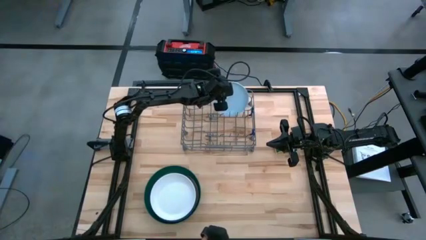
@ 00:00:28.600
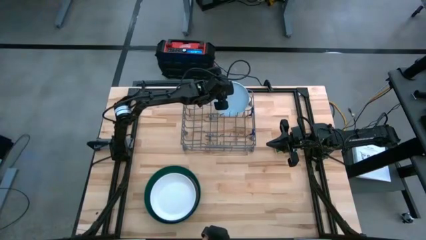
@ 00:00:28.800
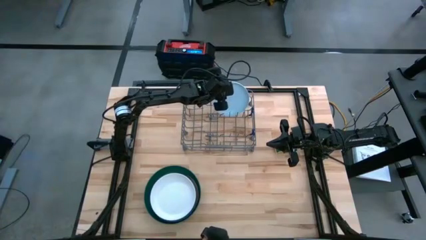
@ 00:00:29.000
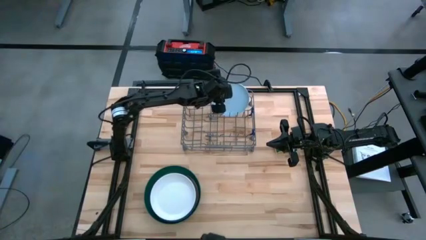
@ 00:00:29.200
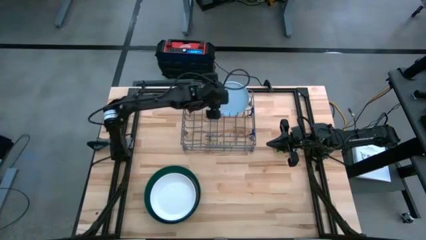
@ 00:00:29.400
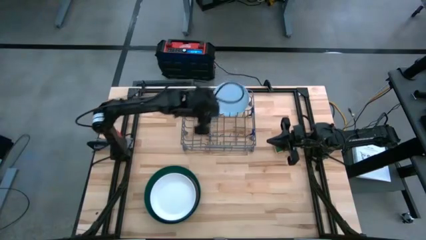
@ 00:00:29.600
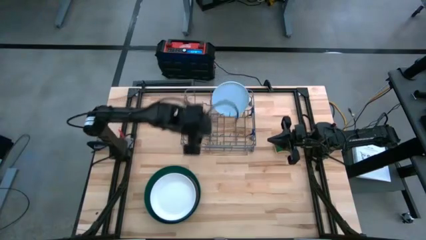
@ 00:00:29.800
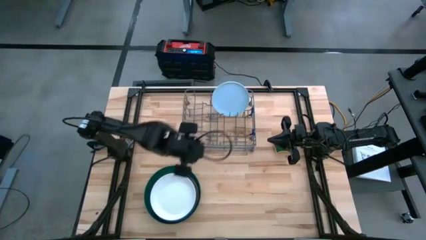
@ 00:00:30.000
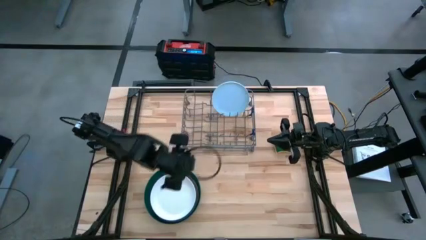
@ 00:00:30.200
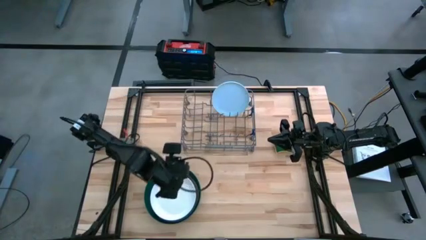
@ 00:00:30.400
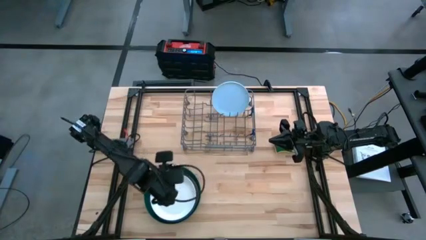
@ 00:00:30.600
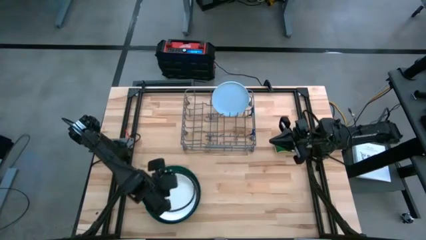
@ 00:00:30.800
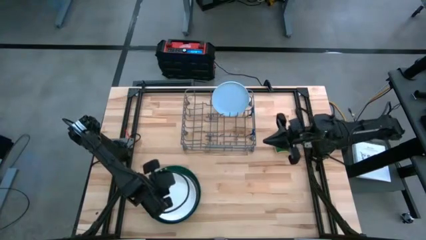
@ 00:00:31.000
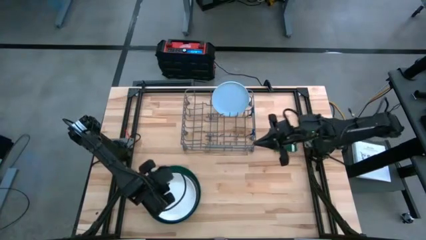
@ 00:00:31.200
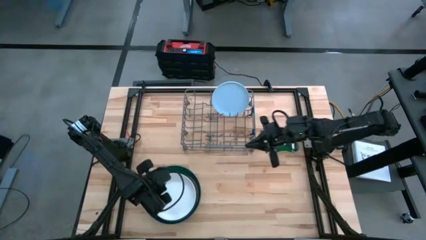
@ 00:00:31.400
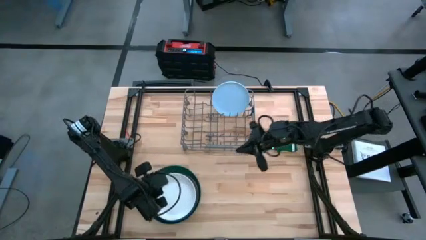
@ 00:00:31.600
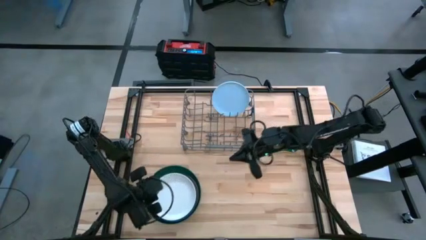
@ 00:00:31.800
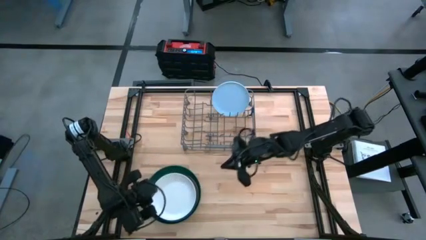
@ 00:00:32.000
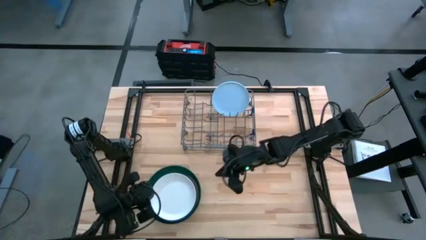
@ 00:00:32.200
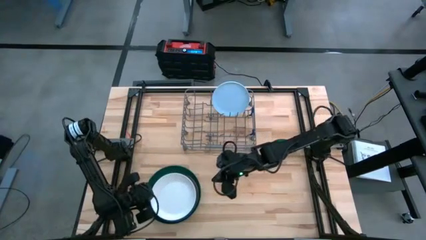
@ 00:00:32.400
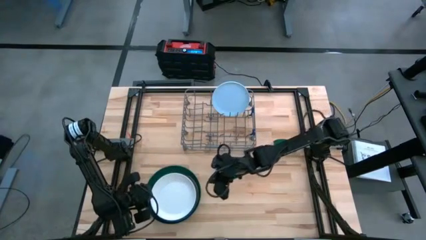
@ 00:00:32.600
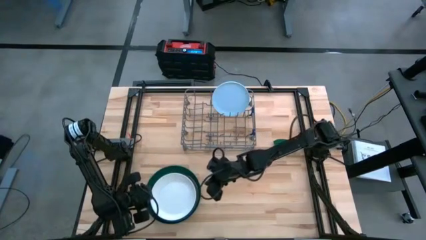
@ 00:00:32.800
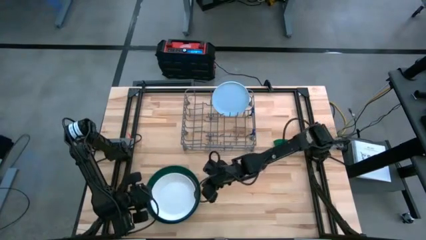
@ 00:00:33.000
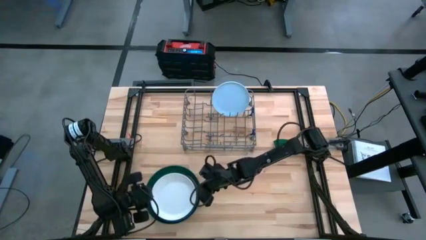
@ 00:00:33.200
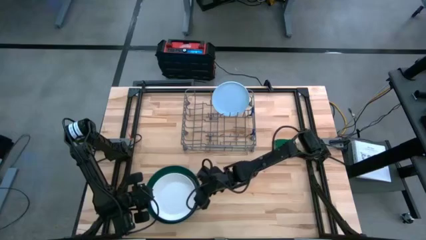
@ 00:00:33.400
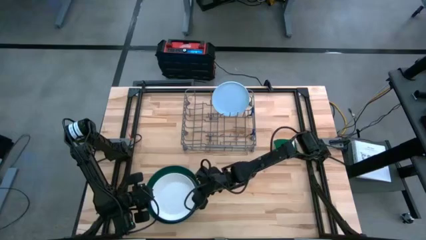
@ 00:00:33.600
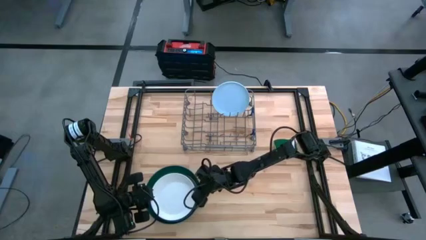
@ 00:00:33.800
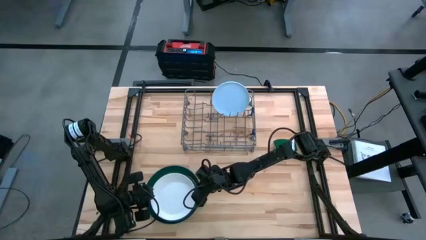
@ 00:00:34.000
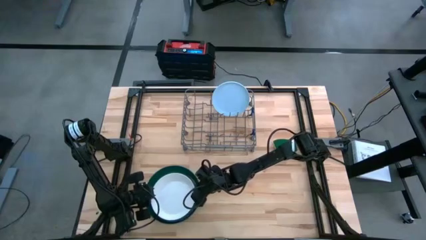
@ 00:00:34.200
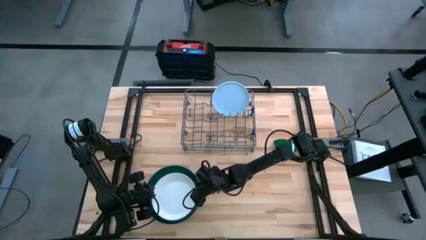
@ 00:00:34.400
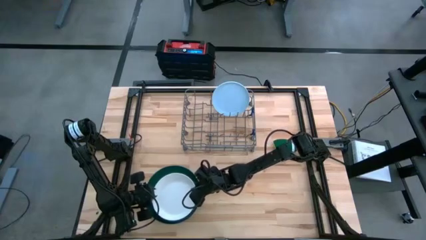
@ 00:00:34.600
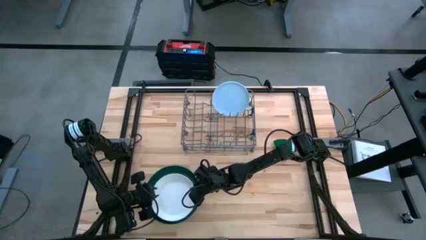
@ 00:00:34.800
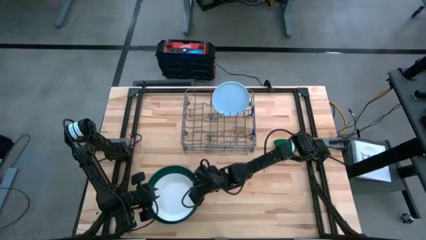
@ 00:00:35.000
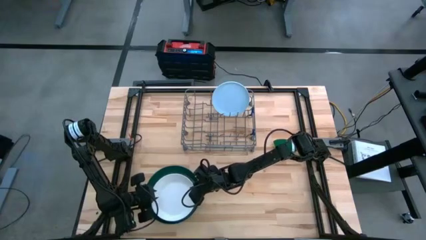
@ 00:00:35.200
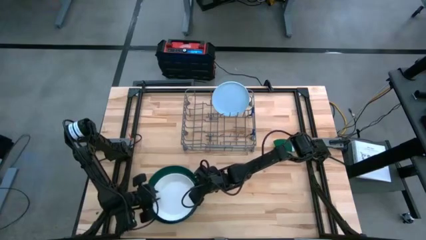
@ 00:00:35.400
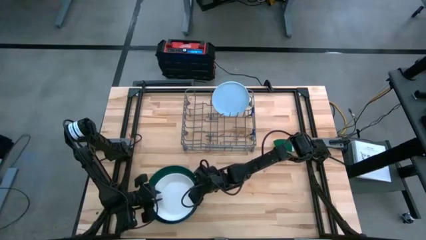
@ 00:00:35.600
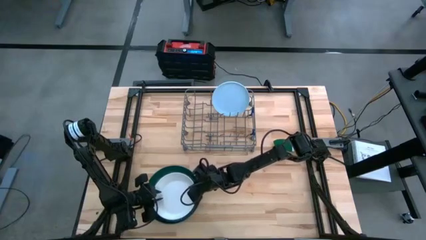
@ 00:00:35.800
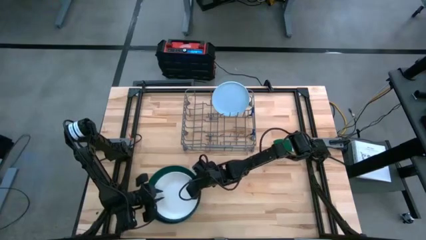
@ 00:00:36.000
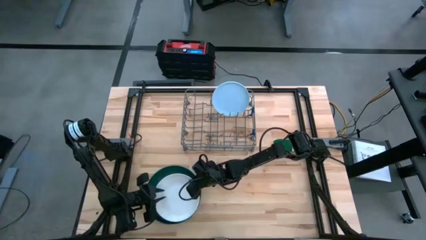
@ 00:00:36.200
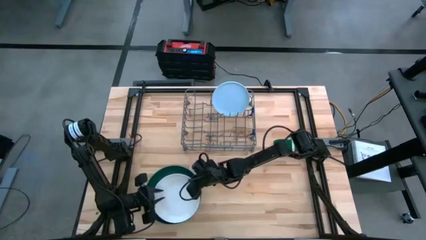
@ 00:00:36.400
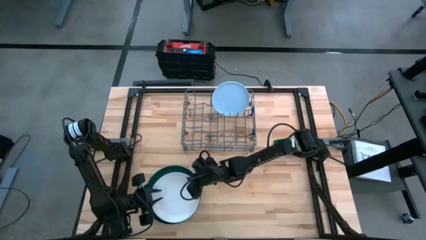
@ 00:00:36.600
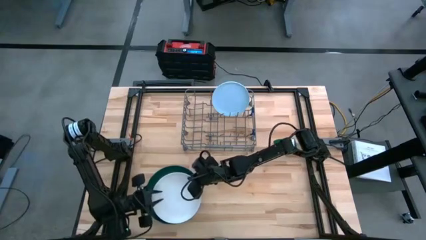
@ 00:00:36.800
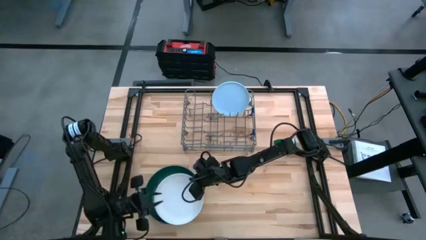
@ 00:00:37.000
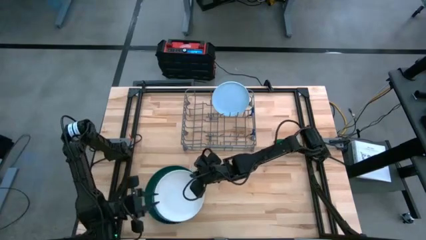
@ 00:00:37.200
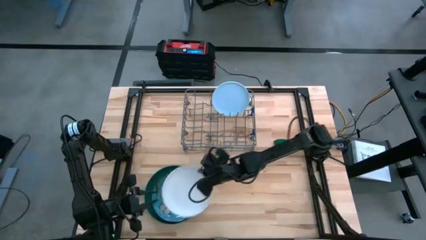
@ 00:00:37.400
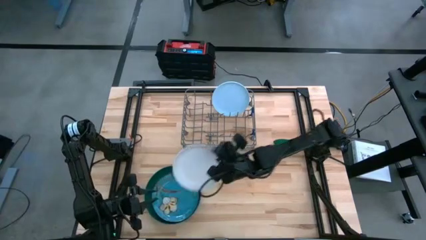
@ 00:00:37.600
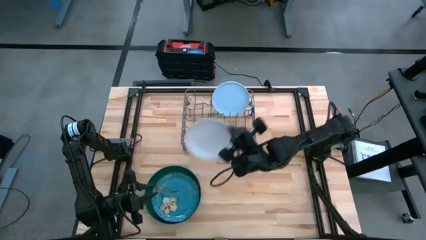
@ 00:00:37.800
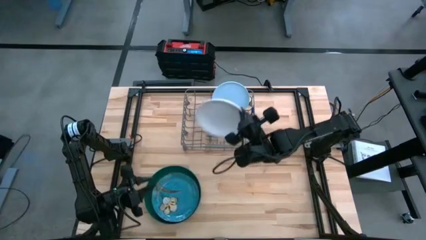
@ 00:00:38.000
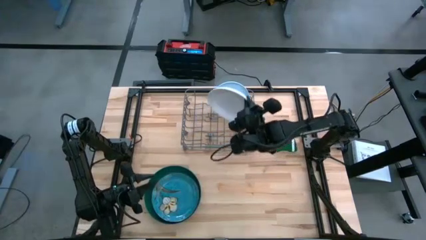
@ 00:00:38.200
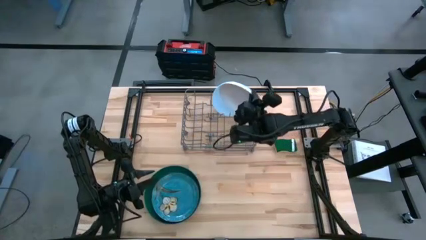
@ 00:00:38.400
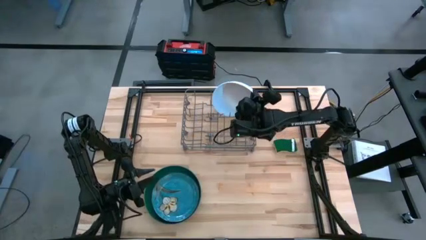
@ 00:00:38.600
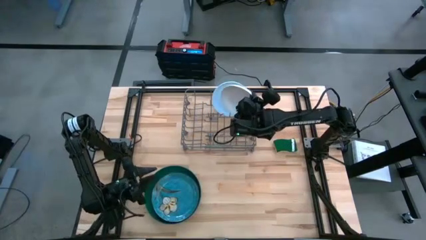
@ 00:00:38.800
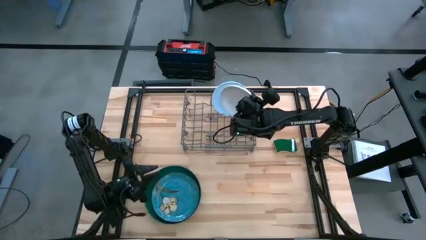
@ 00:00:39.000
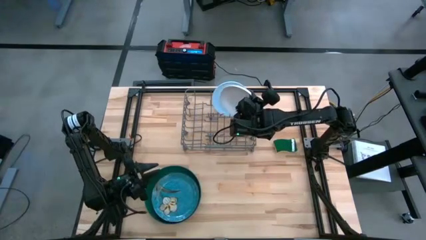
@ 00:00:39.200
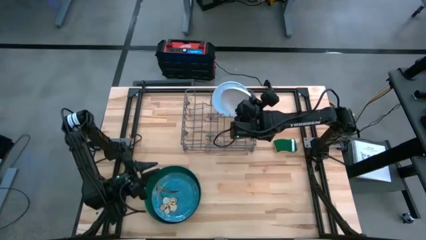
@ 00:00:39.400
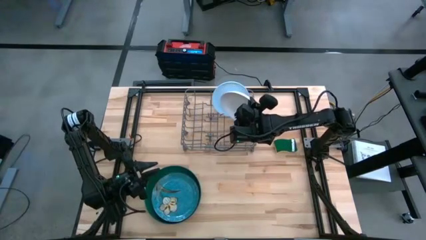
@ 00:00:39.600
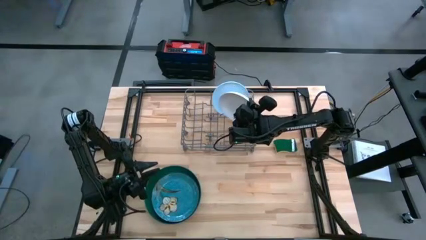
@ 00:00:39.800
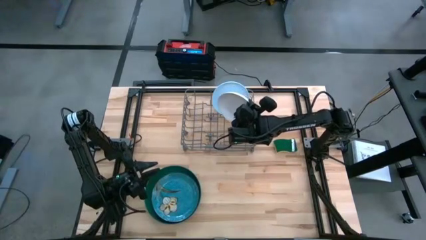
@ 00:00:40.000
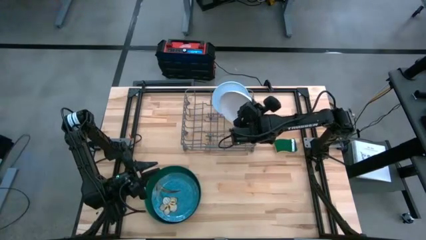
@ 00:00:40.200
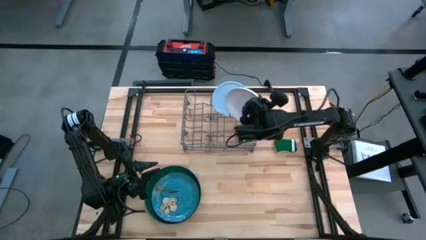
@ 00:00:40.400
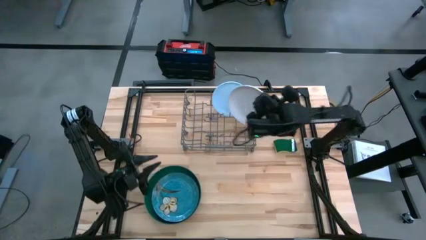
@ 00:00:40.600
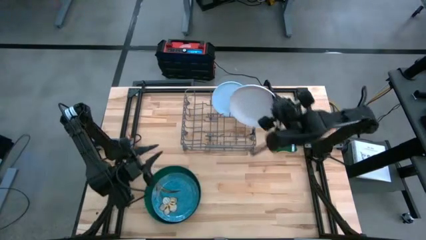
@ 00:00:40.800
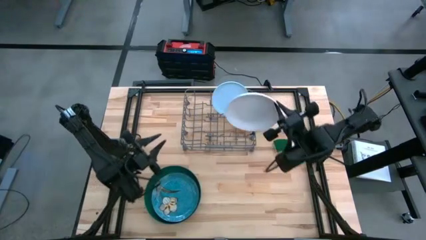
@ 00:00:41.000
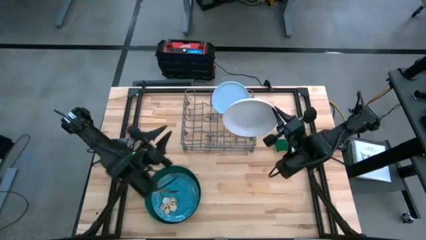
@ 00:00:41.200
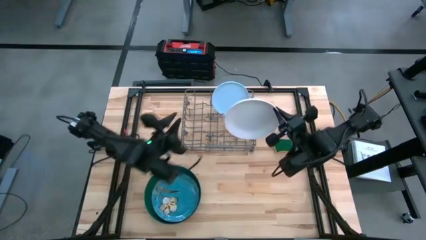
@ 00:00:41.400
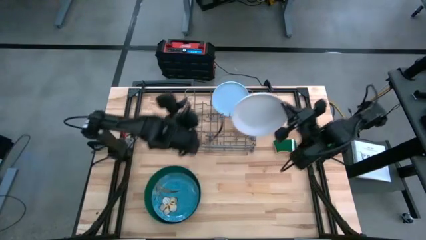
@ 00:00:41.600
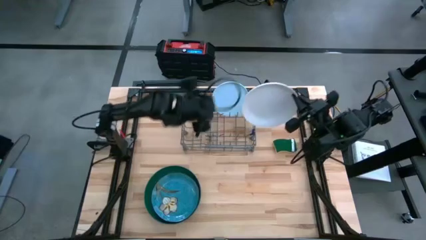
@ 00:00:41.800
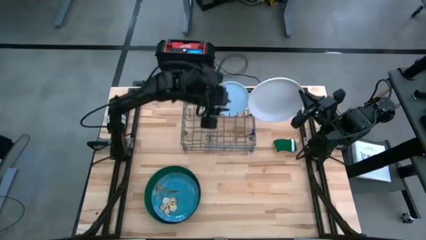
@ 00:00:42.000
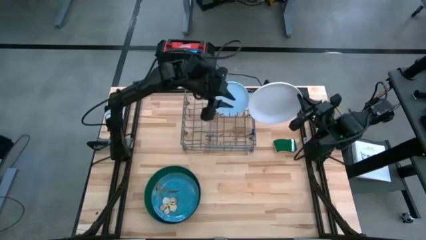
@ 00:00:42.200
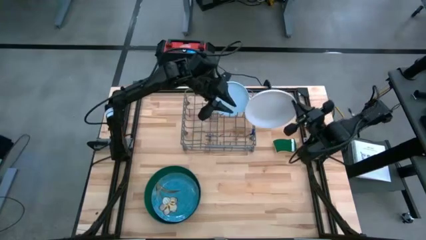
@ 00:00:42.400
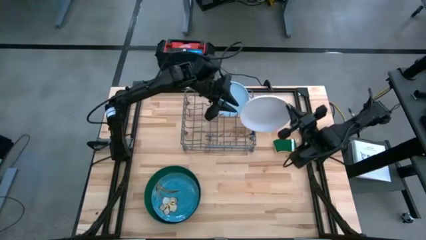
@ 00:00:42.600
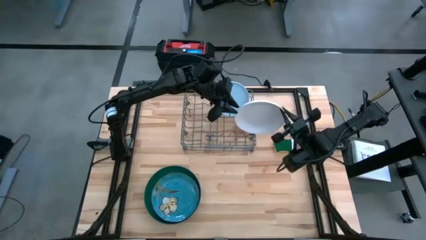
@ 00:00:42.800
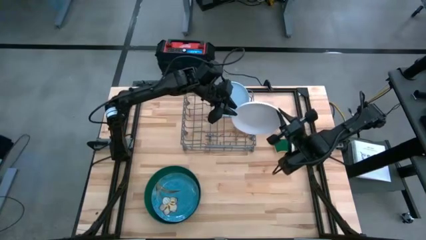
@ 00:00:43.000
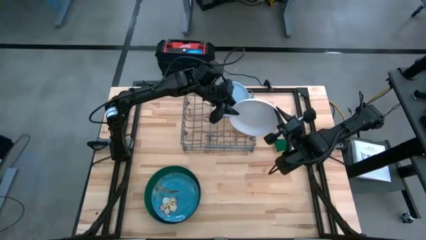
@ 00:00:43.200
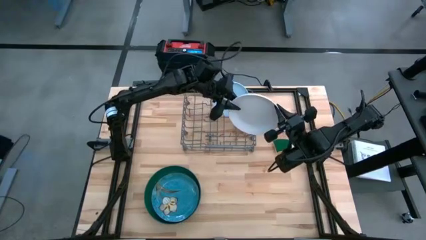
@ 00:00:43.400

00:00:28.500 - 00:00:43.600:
Task: Sort dishes
Put the white plate in the dishwasher rack
